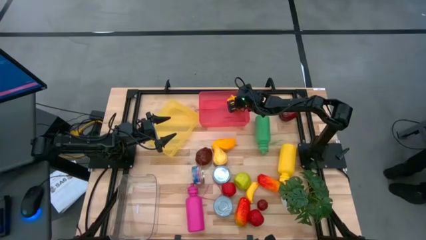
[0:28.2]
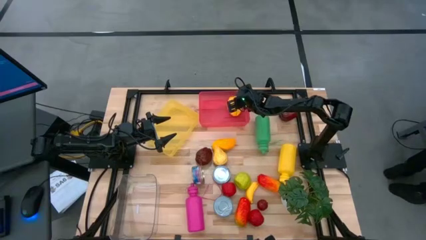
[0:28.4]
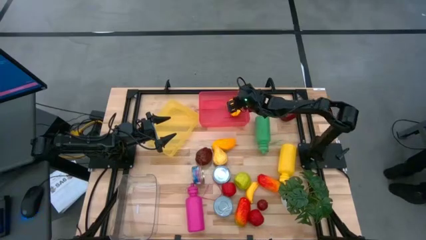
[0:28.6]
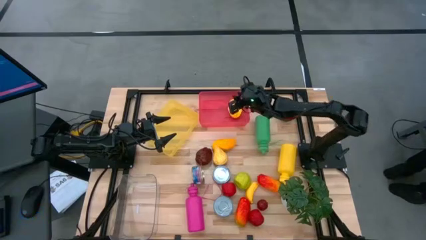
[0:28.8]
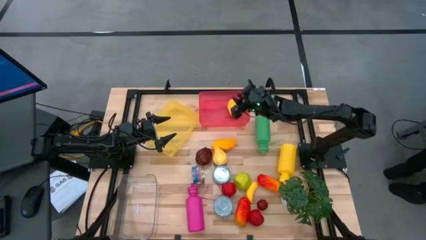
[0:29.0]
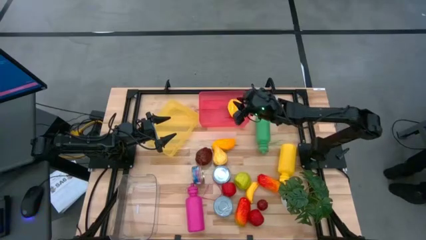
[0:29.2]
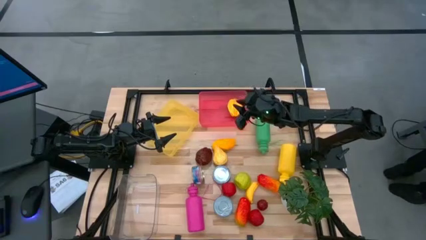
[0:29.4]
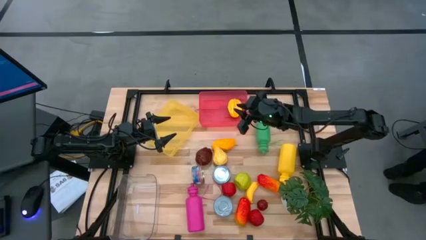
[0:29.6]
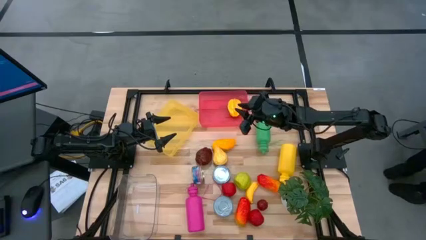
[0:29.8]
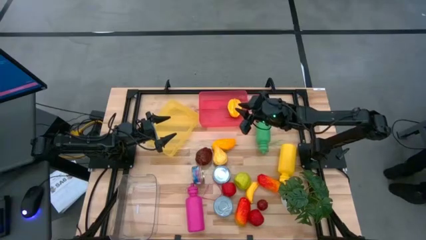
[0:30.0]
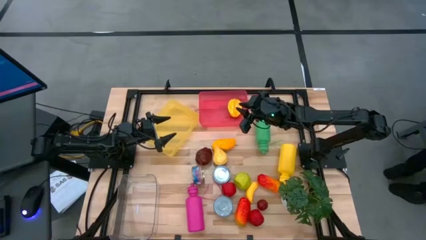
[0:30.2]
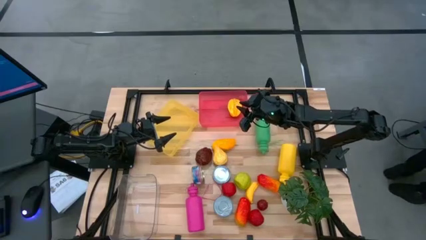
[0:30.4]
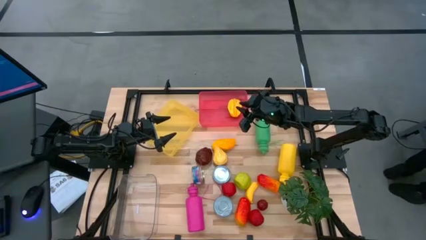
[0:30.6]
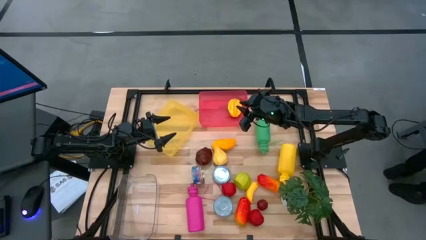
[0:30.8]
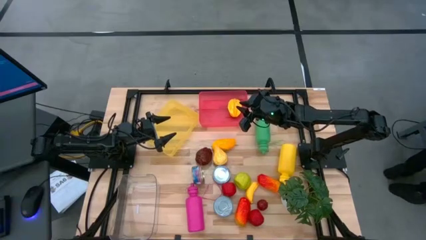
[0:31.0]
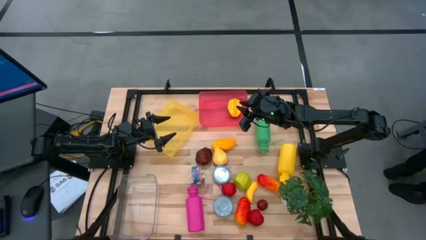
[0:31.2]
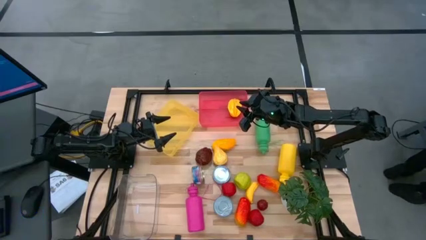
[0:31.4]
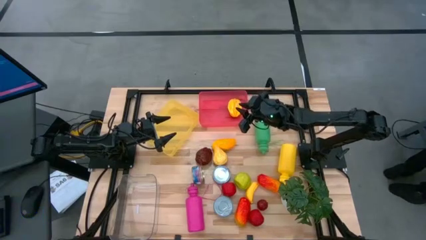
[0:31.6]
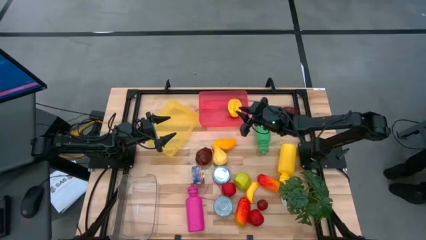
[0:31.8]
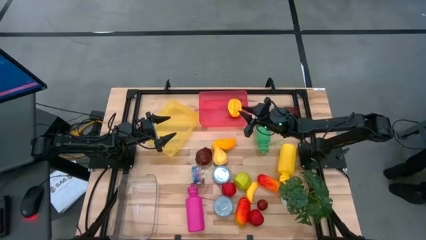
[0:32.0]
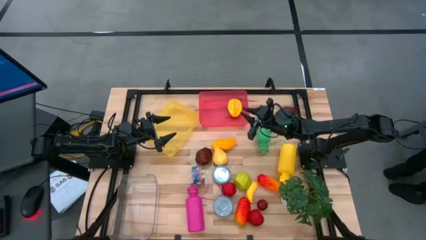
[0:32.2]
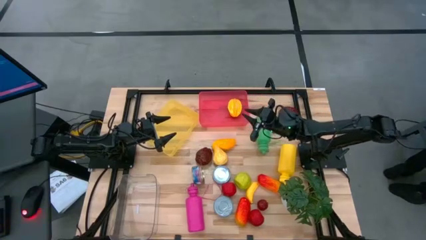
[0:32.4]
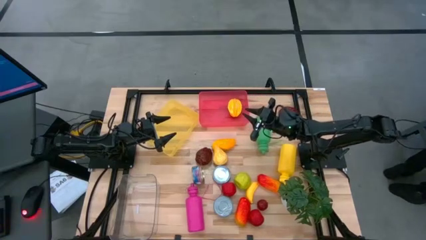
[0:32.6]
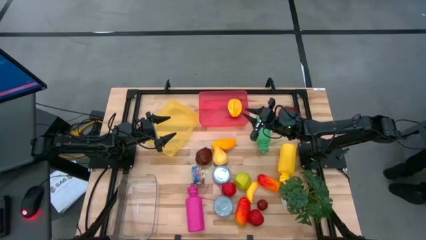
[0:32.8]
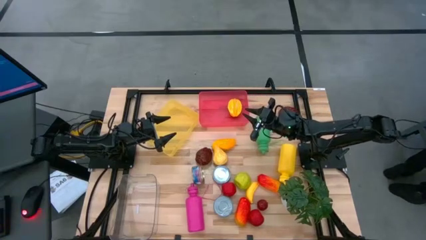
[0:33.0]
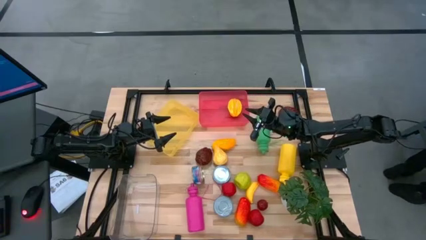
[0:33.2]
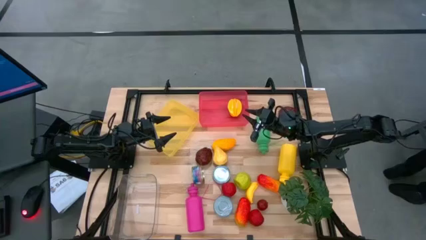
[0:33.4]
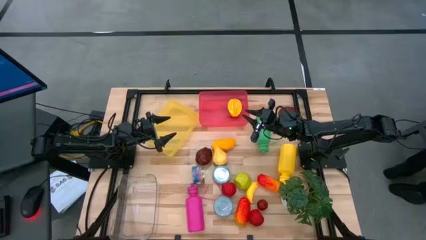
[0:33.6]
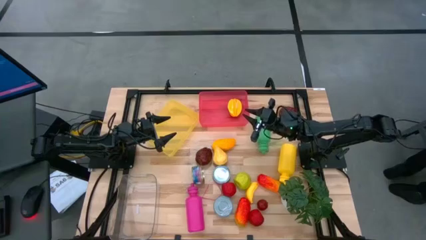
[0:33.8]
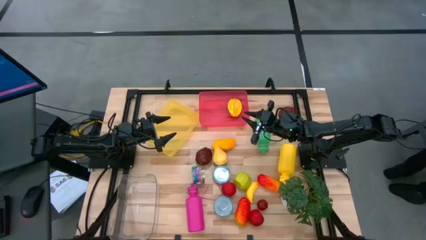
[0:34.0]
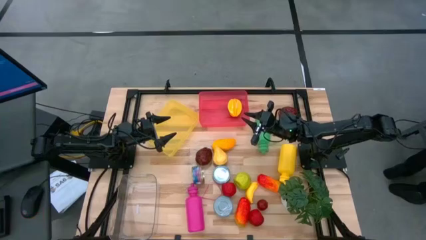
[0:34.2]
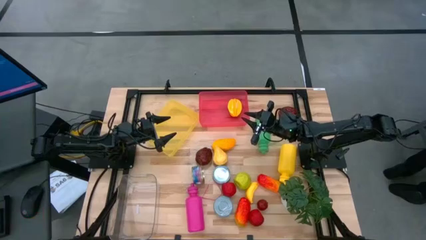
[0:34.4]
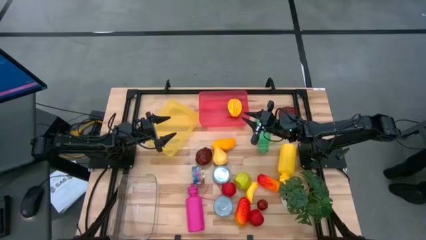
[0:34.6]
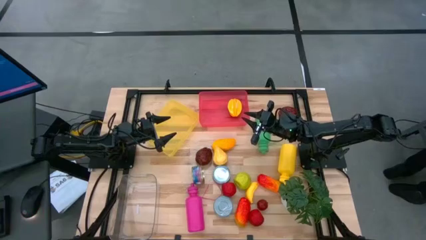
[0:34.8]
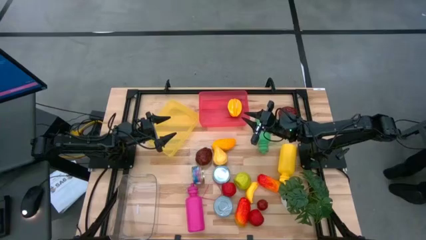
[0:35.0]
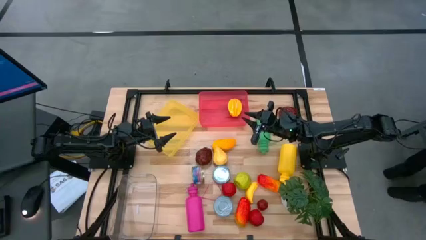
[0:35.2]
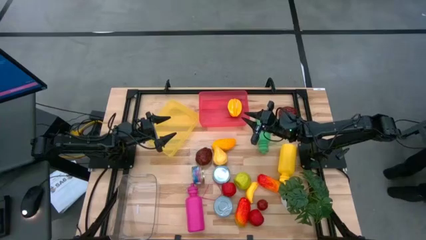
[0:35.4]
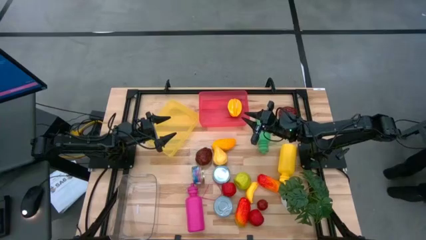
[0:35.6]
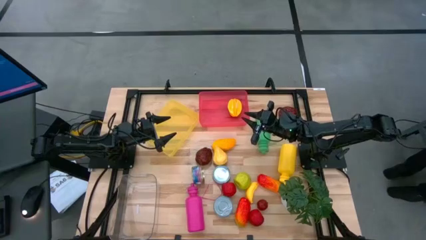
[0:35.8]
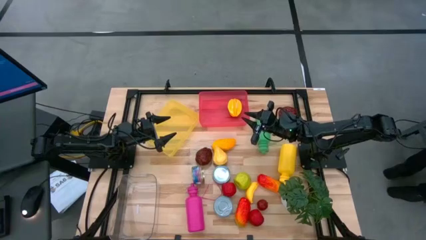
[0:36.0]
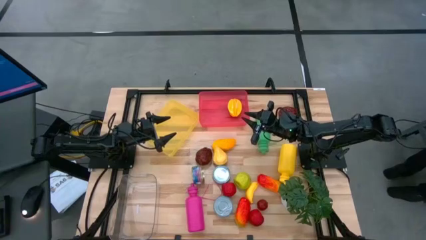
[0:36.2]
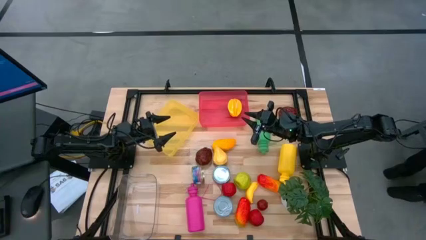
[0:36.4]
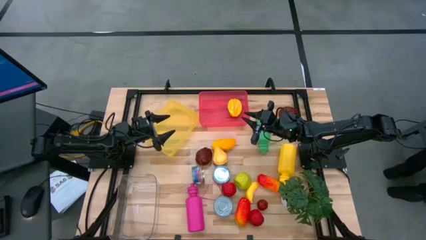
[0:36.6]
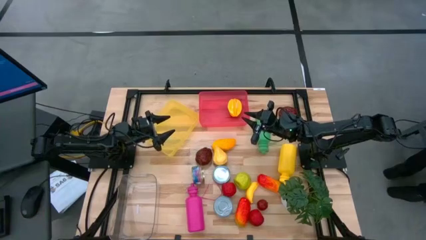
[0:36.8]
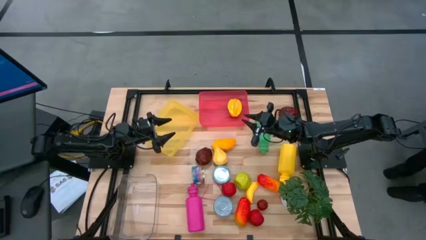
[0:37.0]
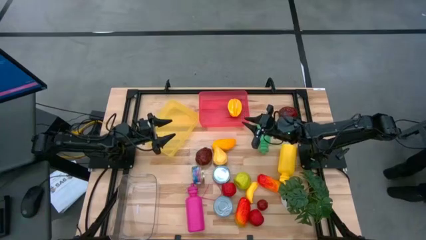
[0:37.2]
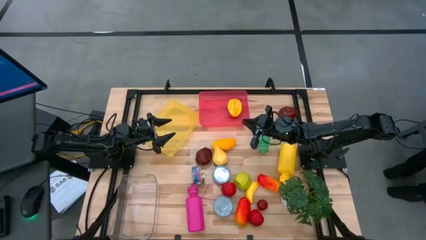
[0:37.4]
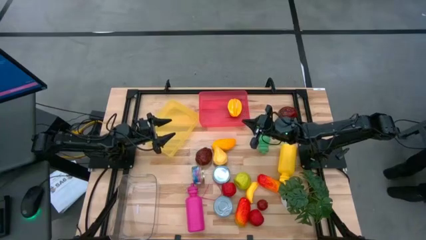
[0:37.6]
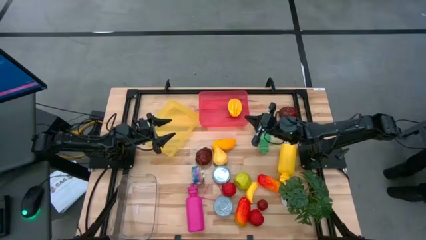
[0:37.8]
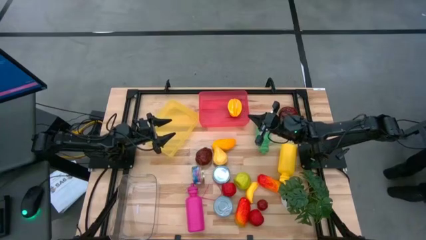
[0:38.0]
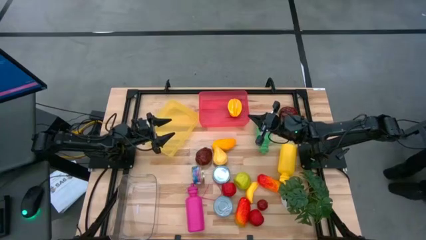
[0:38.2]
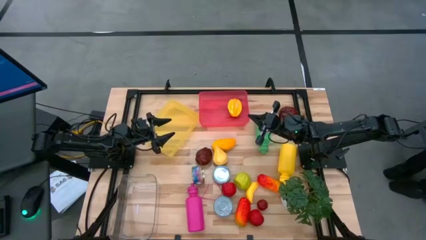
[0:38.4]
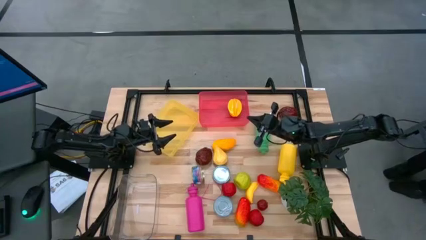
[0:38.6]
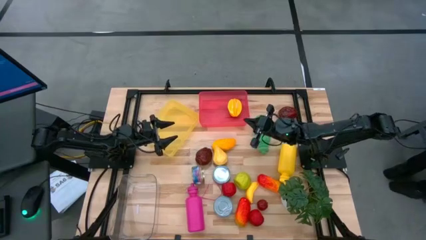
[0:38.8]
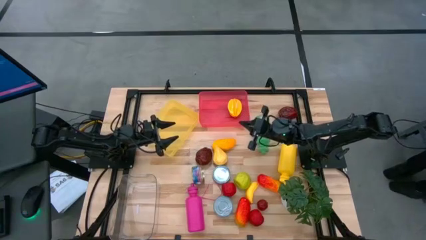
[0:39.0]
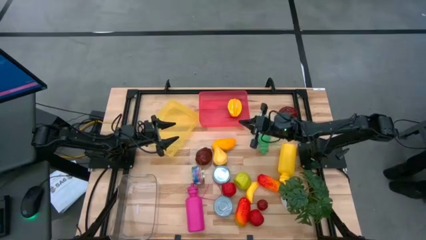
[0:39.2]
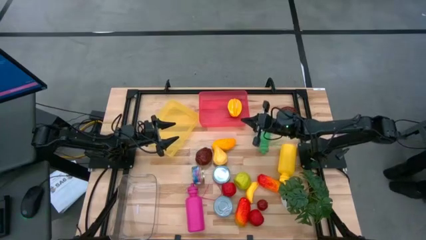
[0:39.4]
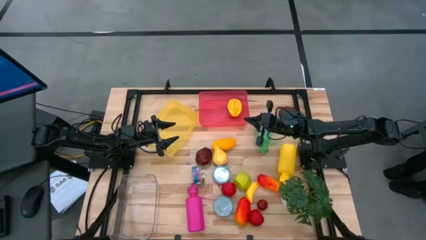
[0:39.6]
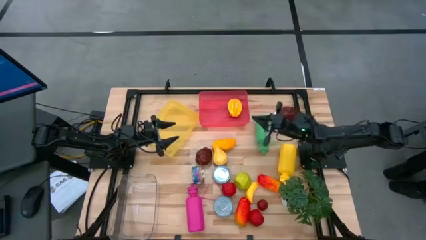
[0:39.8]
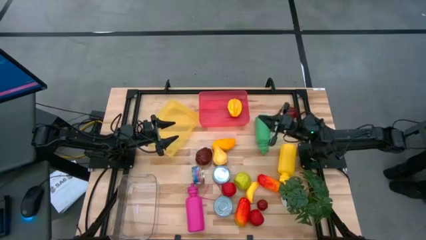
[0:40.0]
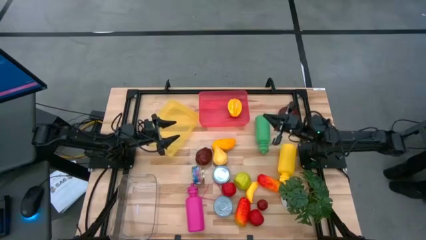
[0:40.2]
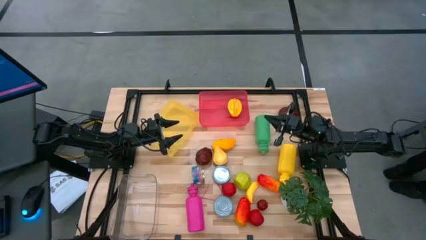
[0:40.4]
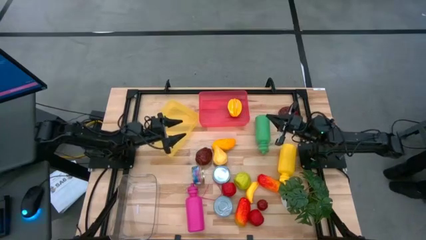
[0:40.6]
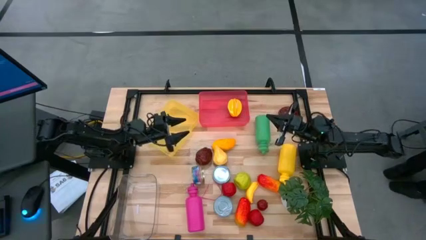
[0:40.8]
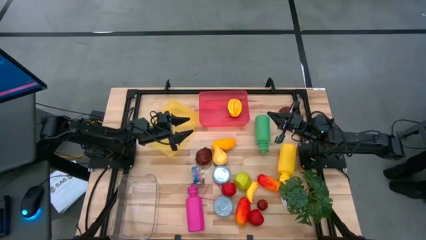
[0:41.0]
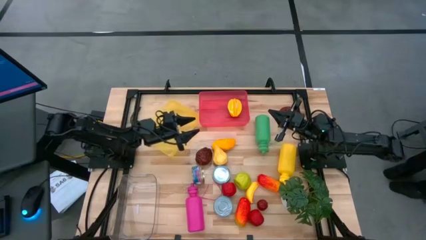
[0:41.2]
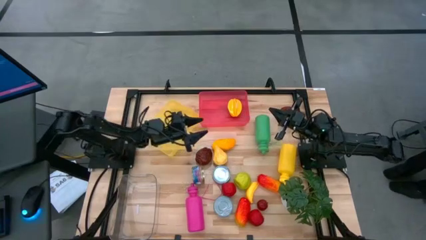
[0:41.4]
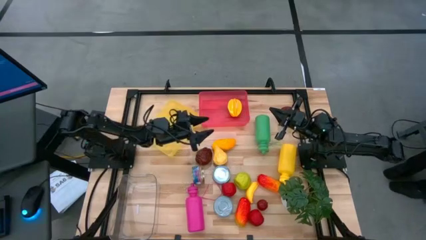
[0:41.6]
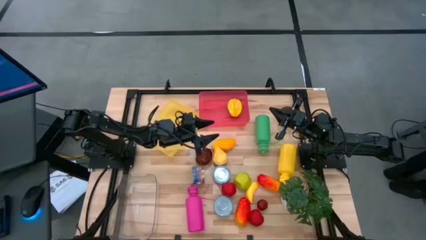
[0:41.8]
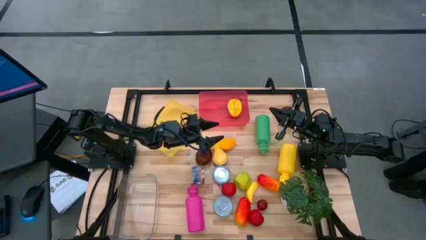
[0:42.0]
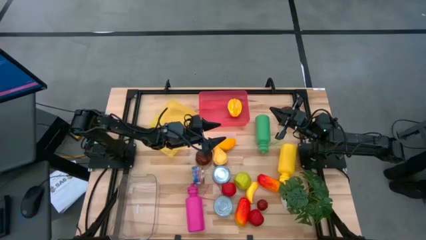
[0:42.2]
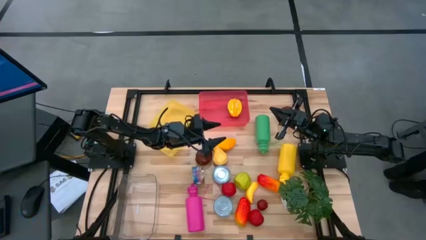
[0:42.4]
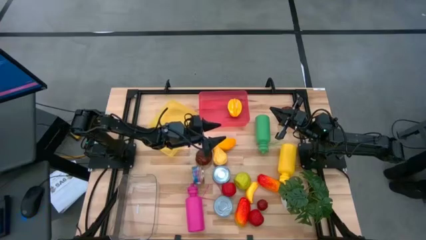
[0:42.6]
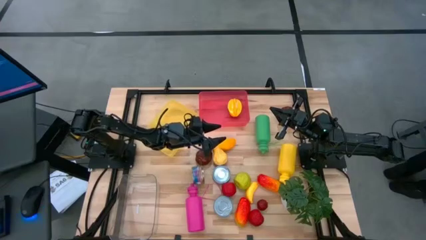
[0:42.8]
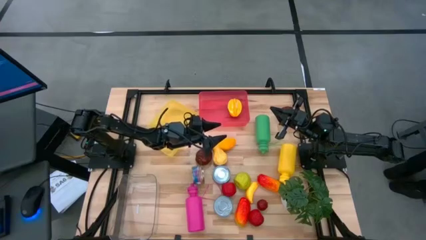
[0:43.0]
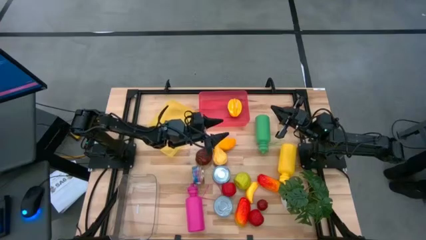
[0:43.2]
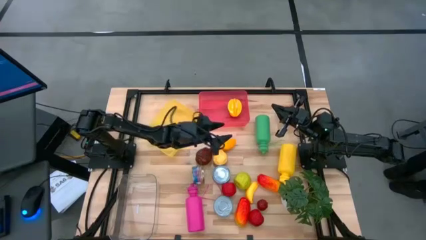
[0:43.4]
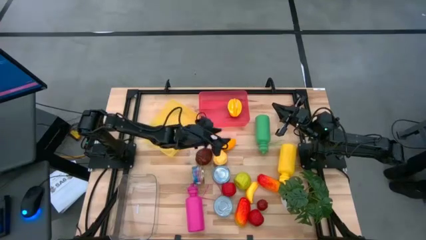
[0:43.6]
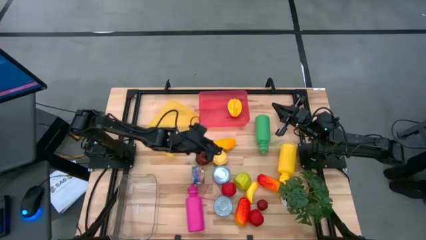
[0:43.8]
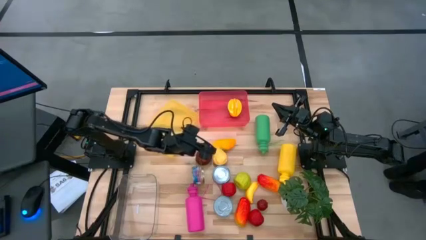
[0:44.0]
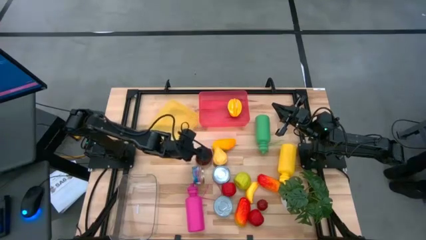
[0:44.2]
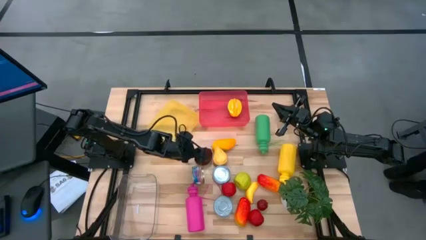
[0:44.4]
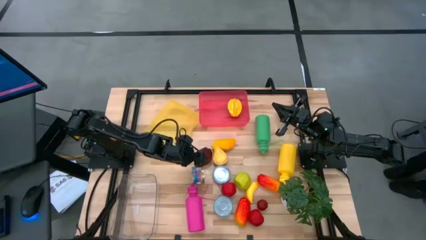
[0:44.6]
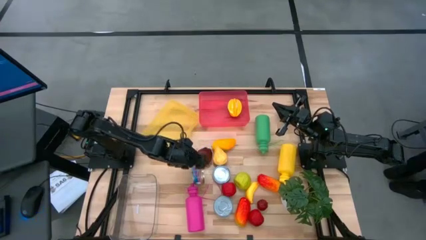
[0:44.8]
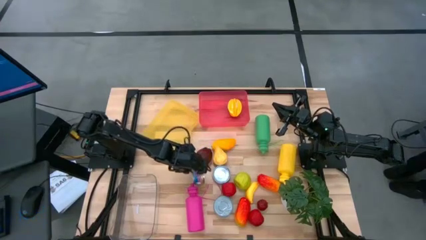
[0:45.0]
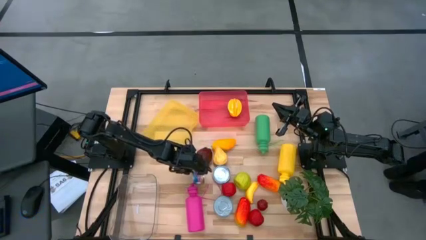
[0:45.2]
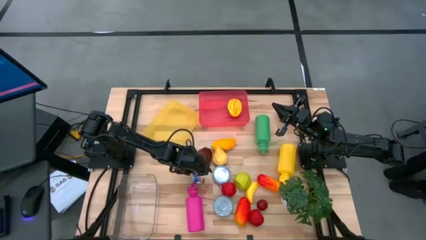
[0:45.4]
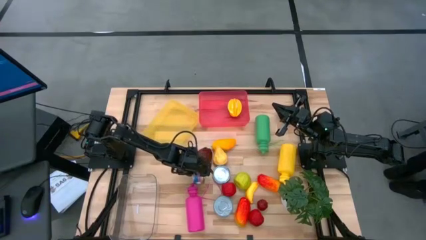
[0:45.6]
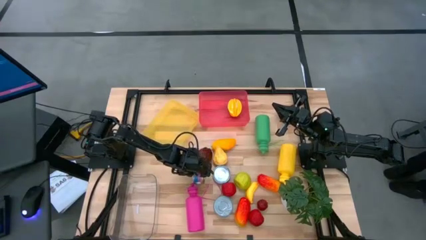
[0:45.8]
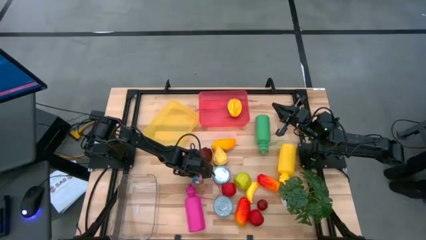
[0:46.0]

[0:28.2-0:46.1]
Task: Pick & Place Food Item
Put the blue tuna can into the yellow bin
